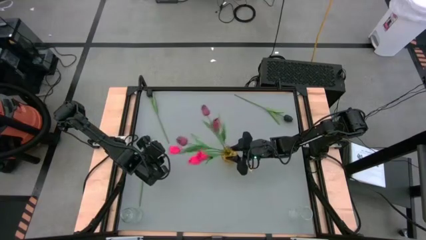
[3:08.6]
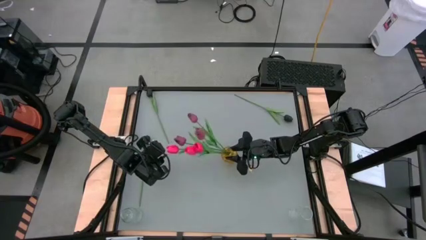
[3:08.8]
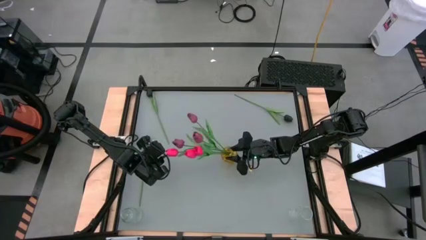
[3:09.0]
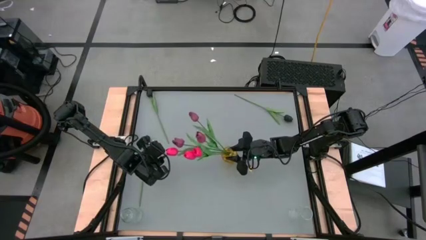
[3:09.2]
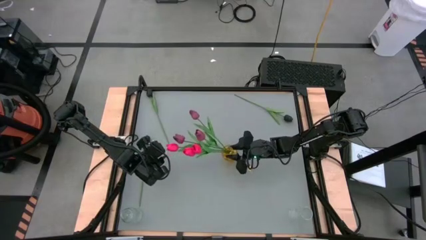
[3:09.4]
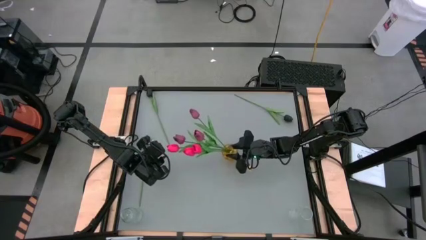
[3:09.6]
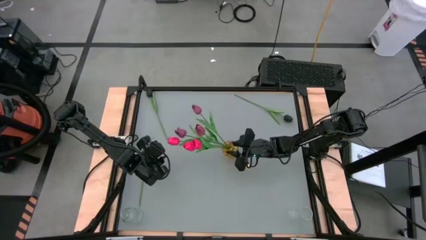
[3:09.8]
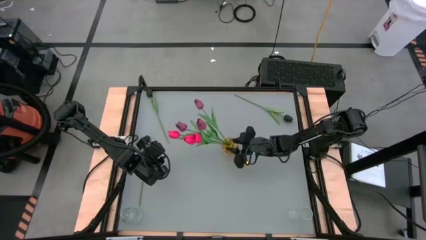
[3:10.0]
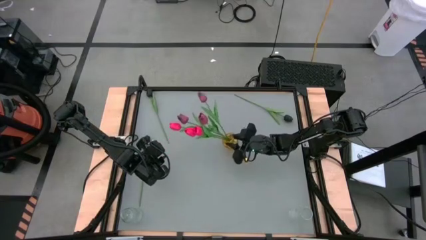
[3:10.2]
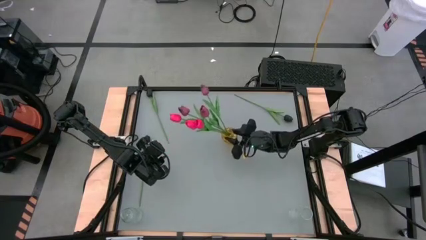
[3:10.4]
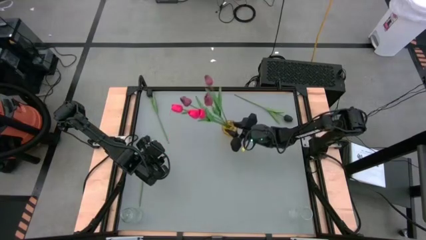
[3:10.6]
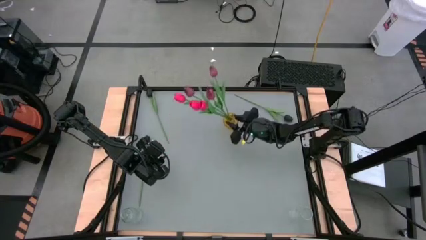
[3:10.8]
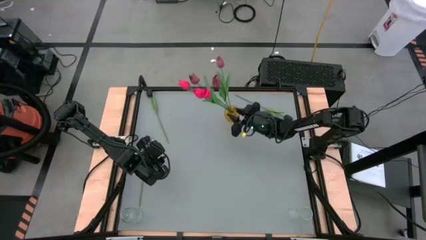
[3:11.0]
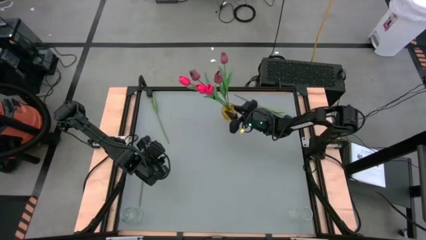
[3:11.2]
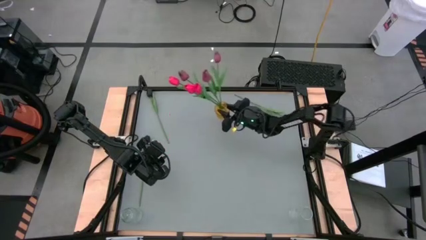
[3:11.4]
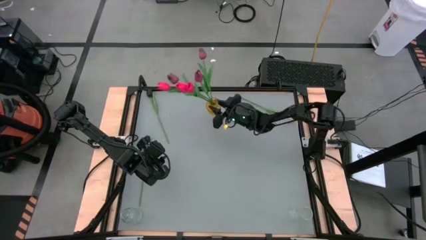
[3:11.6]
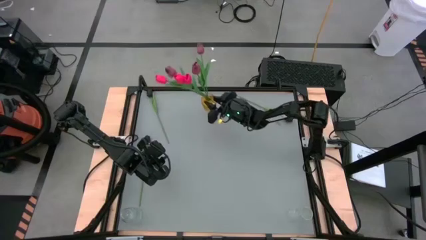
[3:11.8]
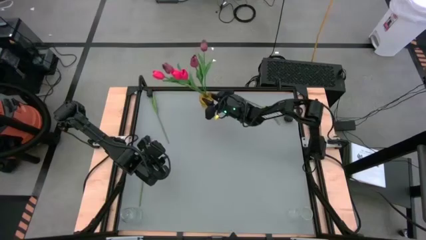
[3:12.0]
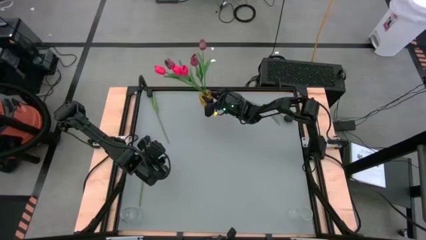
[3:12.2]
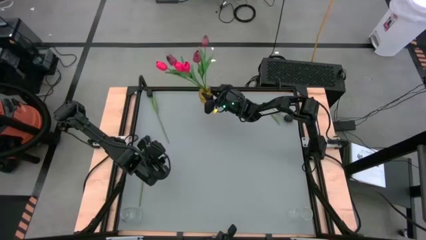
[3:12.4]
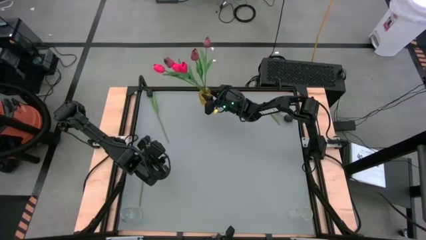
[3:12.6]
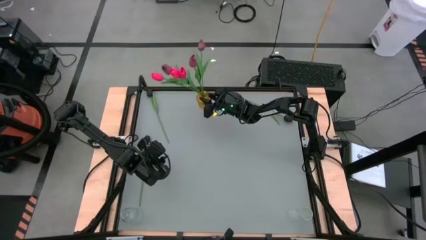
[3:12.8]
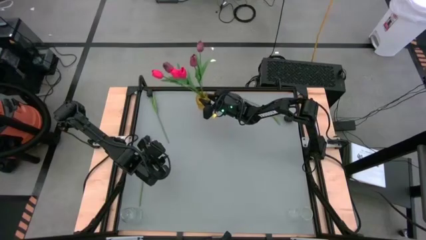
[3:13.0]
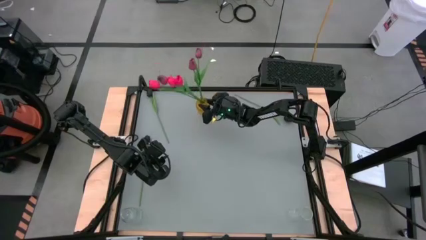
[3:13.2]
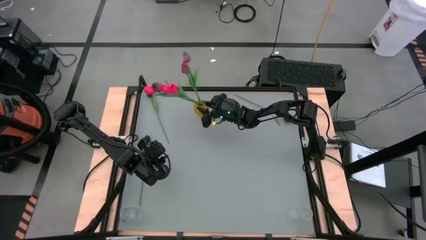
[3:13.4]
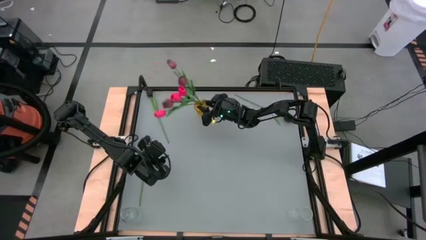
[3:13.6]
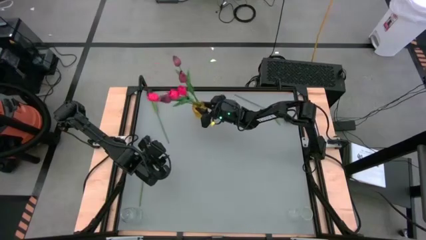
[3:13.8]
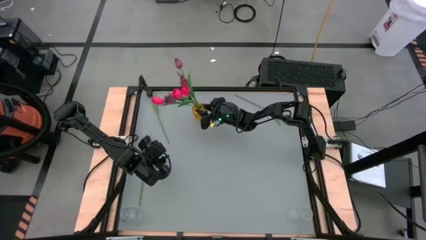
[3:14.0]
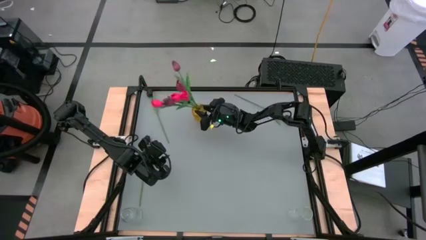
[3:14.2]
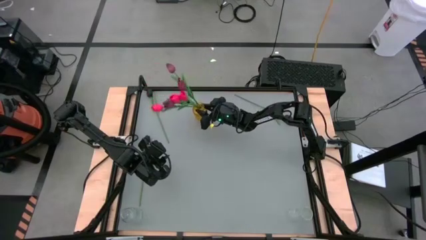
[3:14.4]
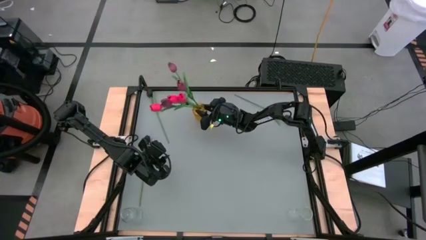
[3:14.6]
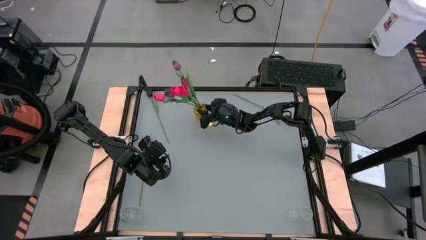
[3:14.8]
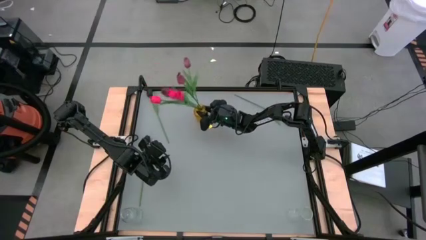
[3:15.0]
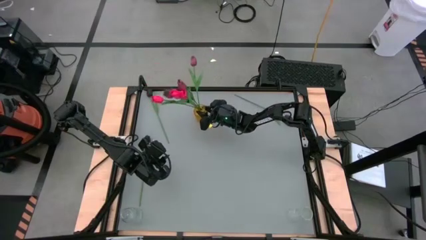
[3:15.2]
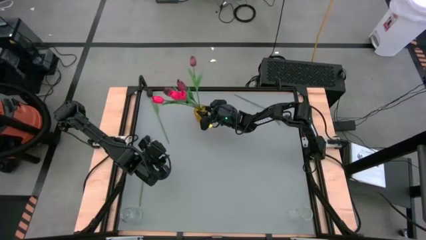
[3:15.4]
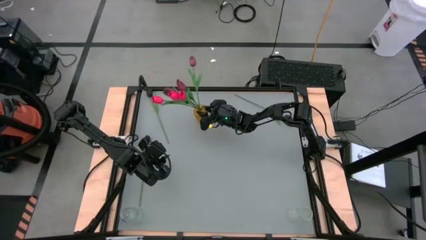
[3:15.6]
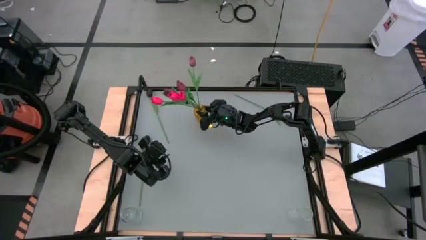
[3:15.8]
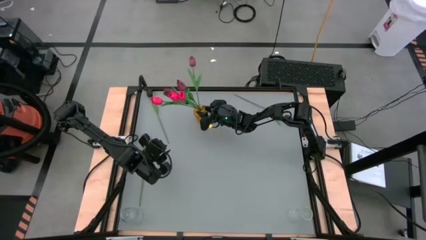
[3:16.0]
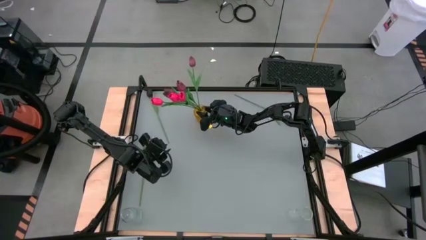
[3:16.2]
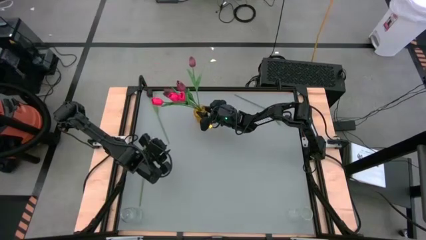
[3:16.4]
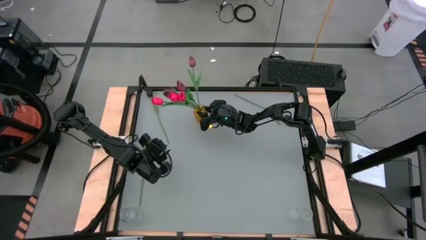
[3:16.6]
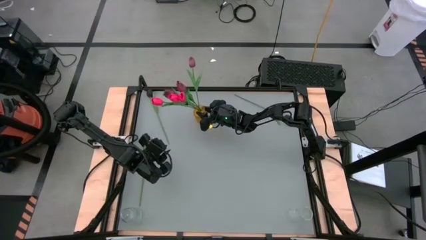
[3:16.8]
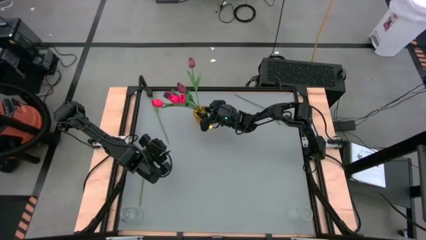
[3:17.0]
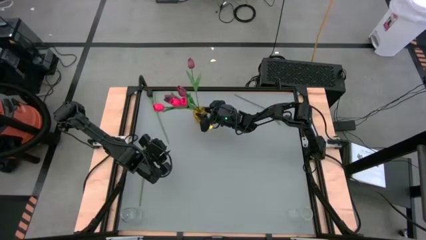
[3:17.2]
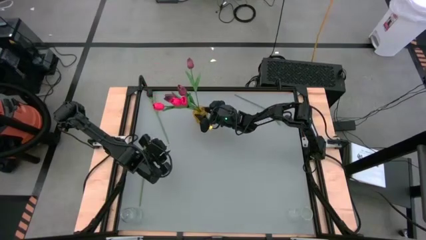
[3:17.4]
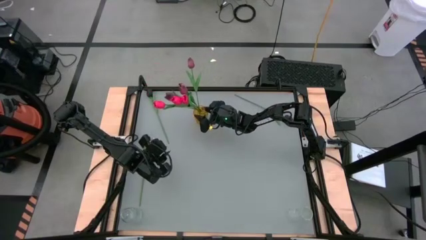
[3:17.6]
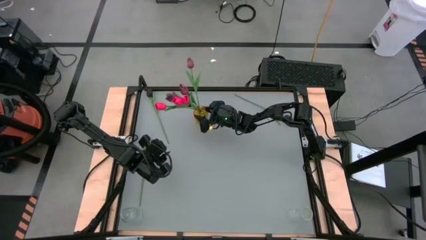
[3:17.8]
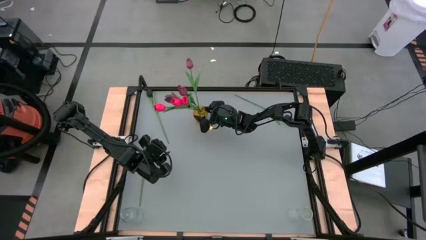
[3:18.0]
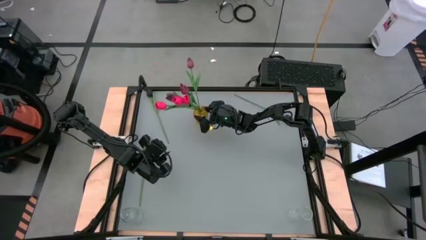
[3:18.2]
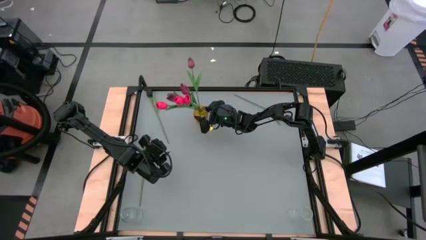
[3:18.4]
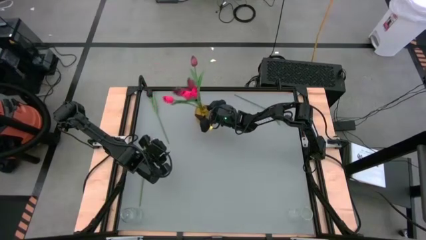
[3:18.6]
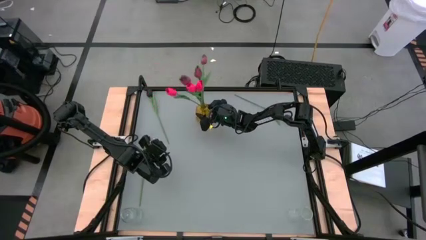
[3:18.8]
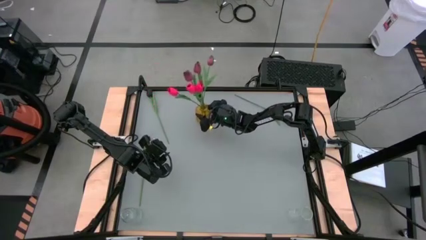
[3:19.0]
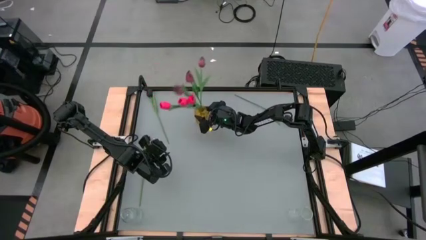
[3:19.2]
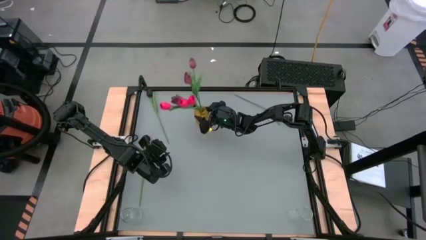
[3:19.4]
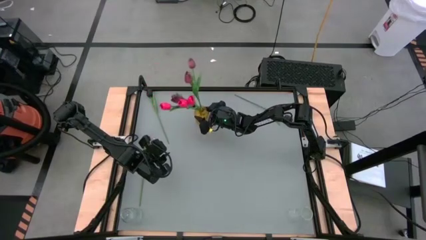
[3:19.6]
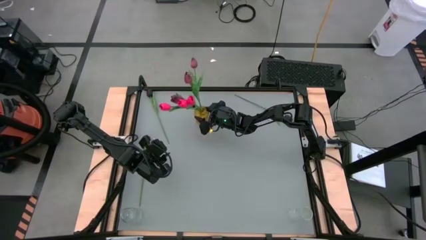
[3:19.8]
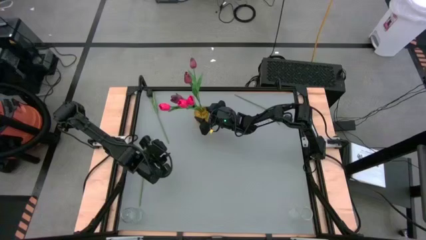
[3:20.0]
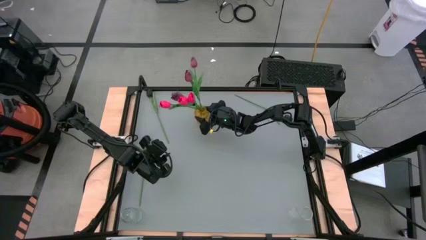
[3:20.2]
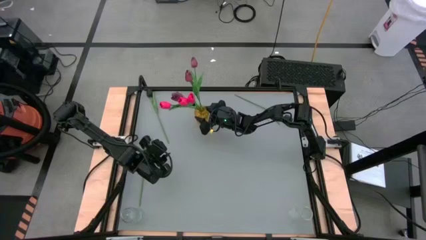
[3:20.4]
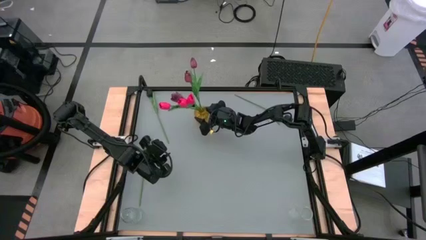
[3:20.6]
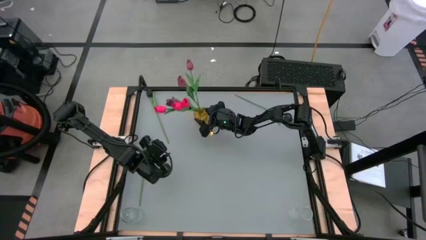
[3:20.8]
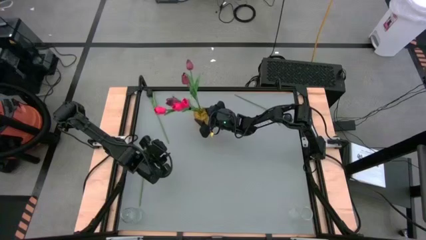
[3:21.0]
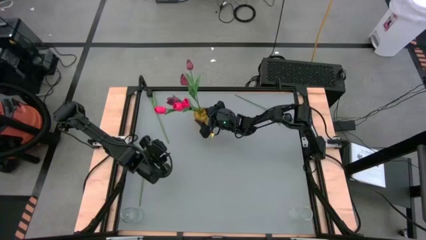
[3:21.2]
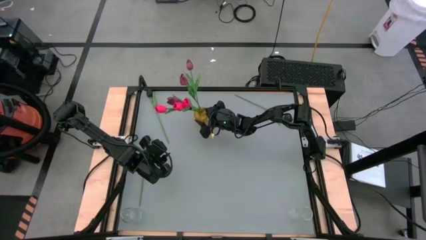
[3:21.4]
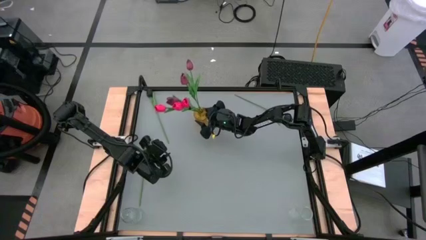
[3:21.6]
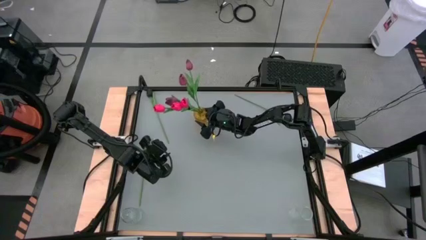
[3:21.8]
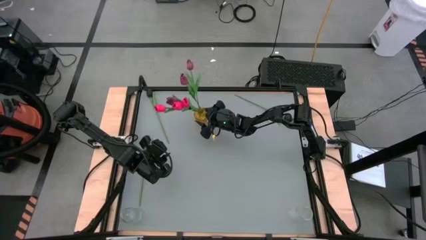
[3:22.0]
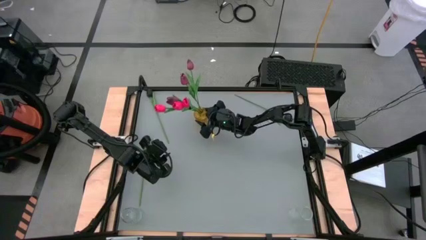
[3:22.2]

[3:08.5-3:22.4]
Task: Sort flowers into vase by color
Move the yellow vase to the top of the table
